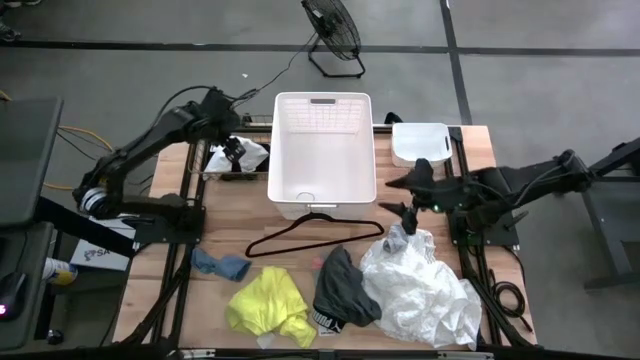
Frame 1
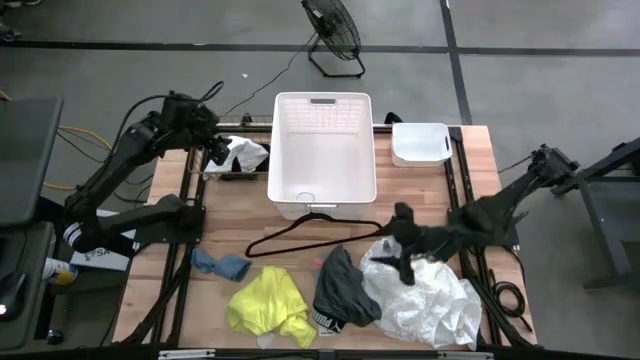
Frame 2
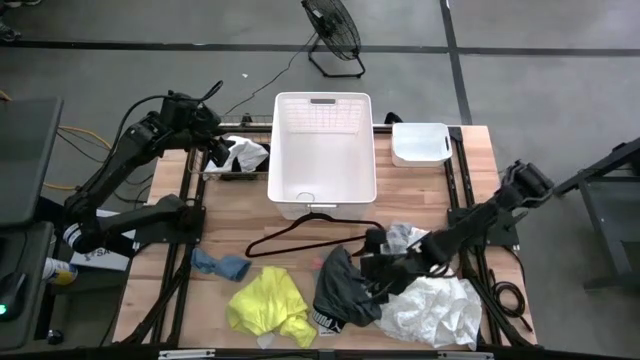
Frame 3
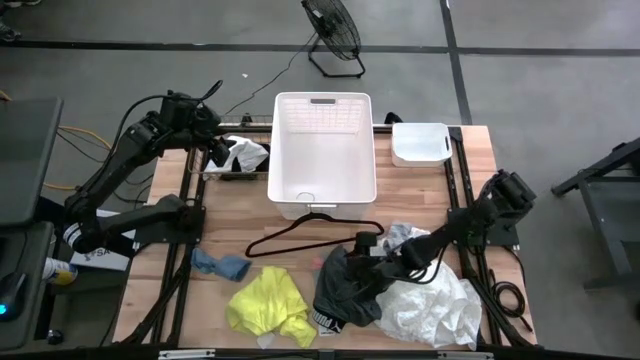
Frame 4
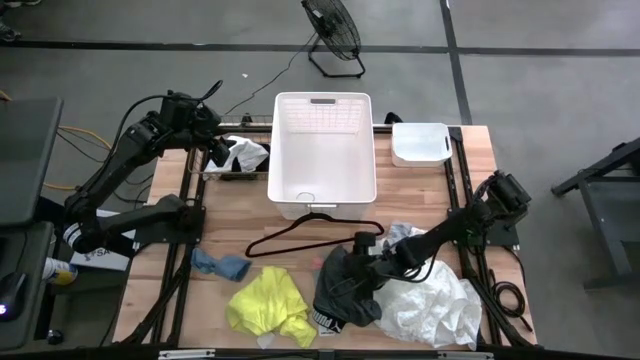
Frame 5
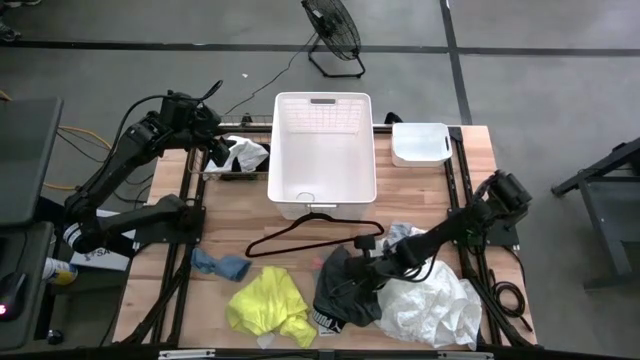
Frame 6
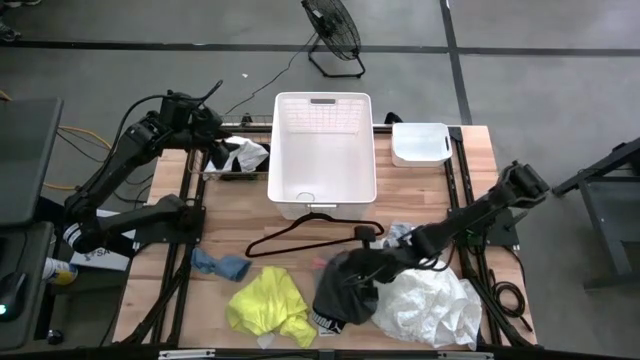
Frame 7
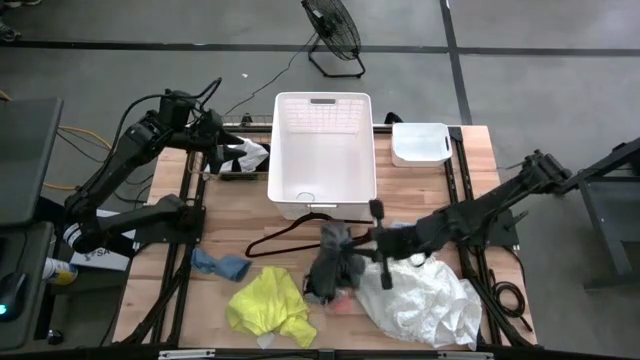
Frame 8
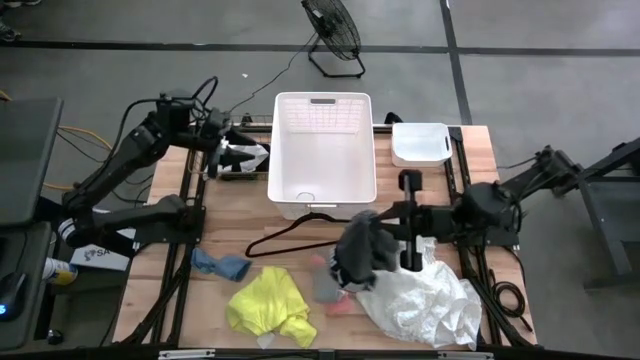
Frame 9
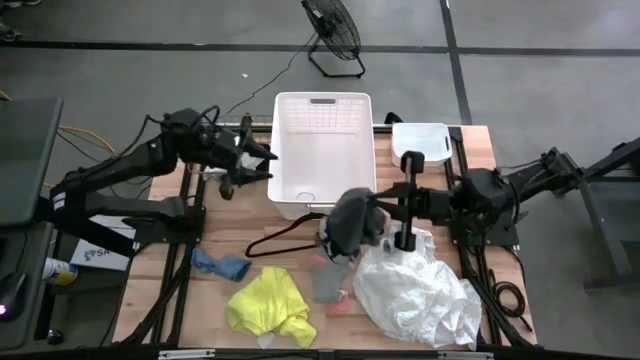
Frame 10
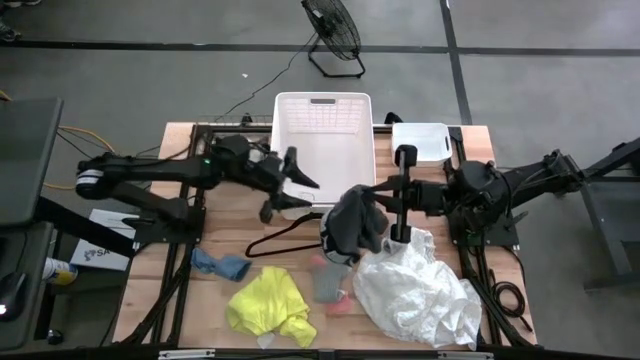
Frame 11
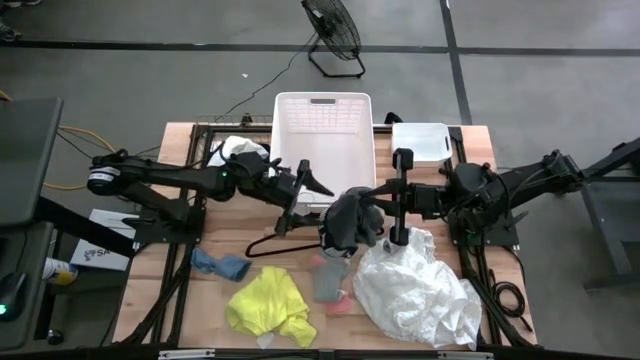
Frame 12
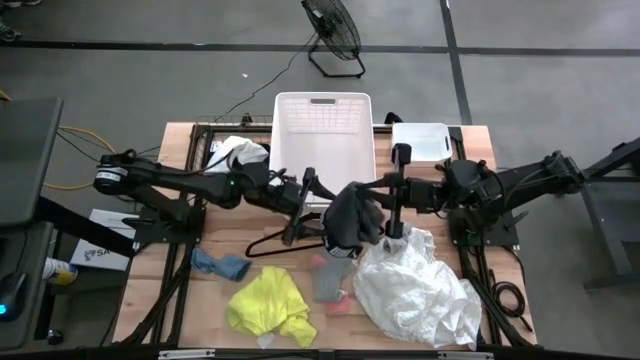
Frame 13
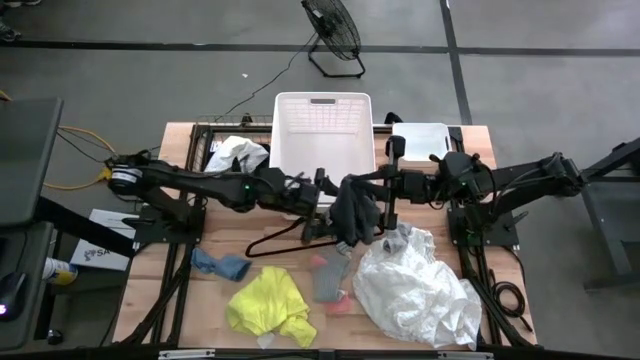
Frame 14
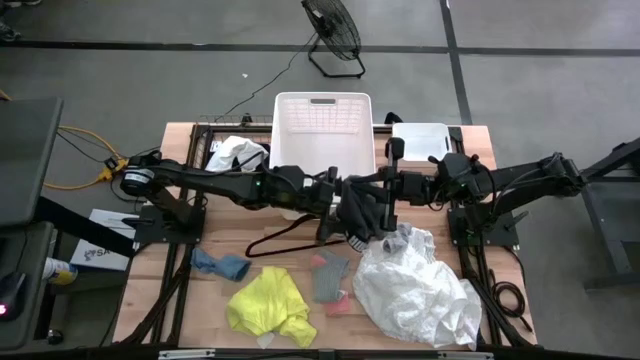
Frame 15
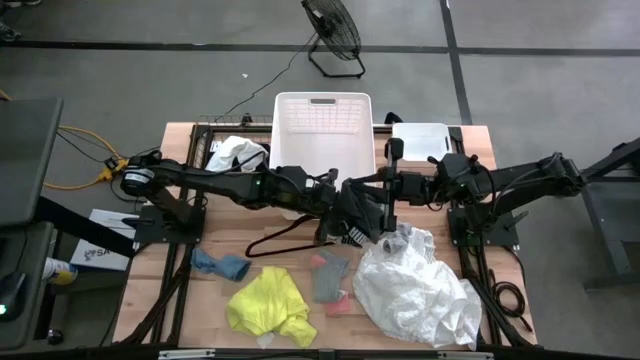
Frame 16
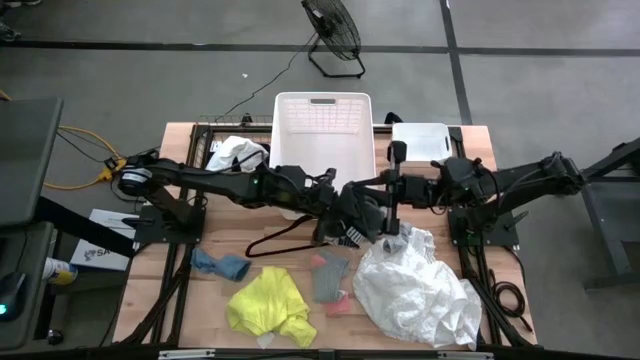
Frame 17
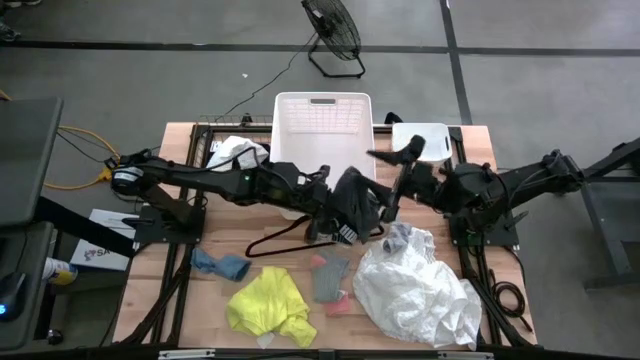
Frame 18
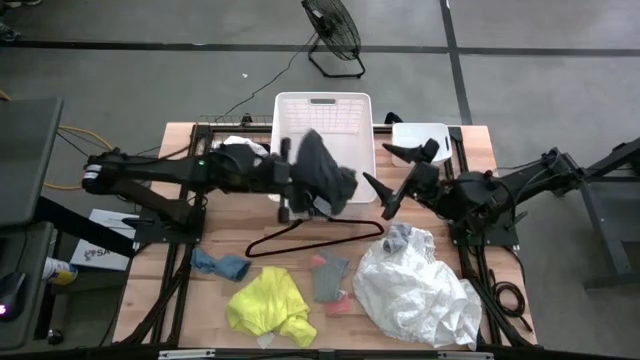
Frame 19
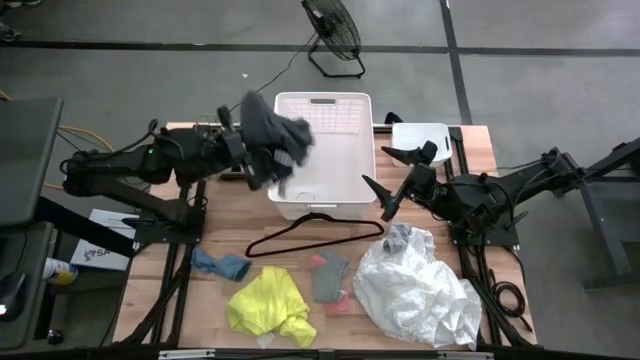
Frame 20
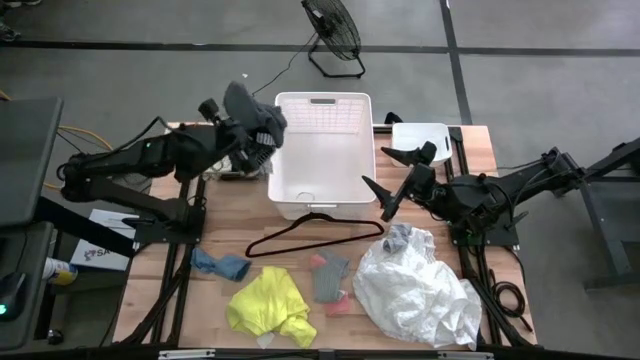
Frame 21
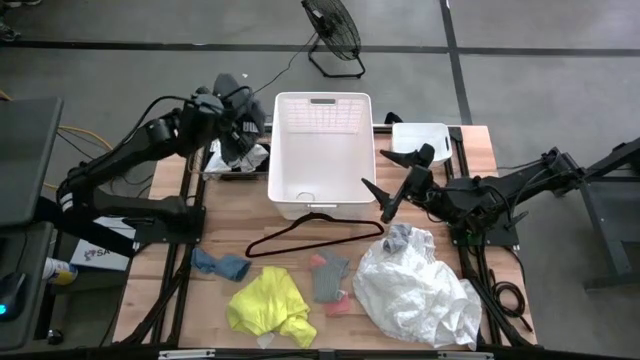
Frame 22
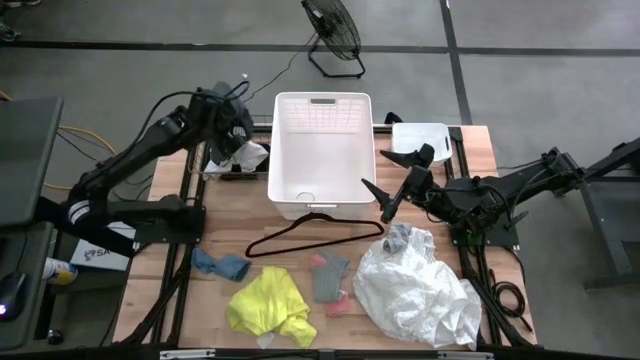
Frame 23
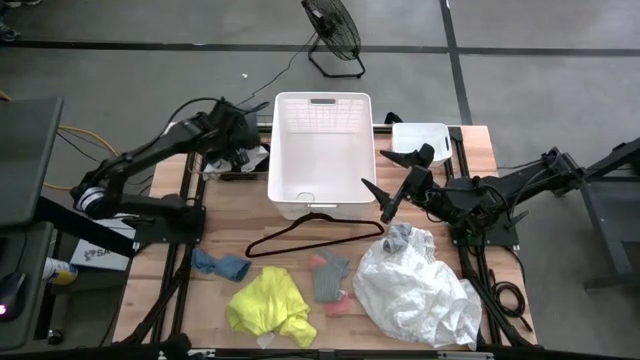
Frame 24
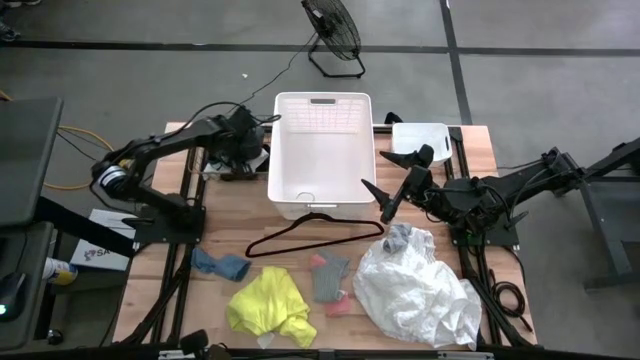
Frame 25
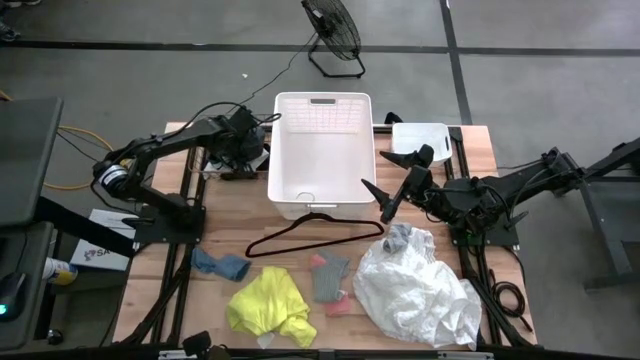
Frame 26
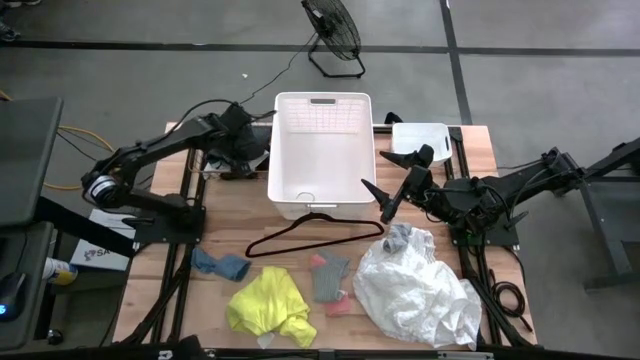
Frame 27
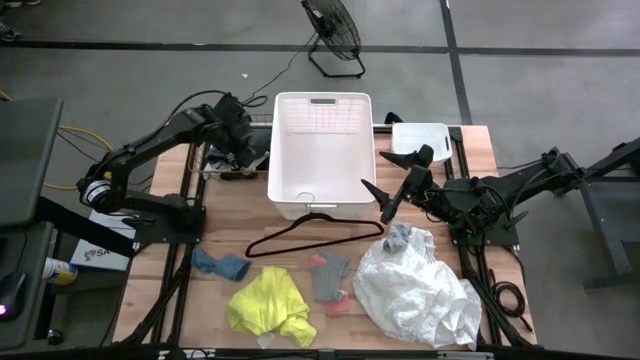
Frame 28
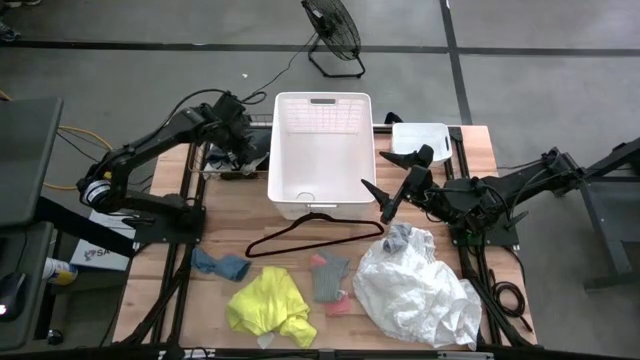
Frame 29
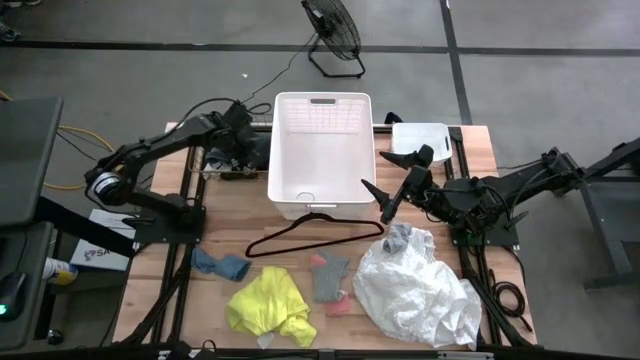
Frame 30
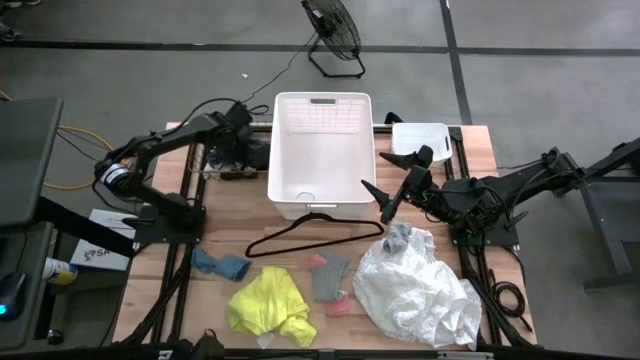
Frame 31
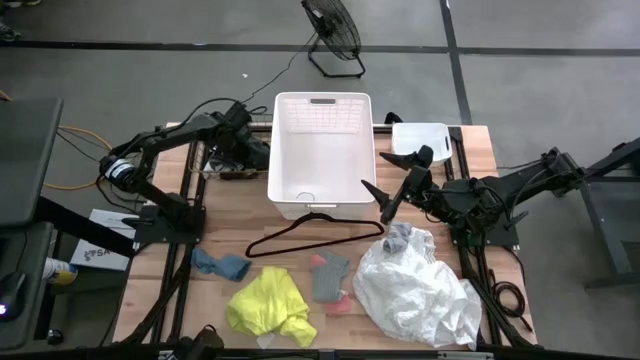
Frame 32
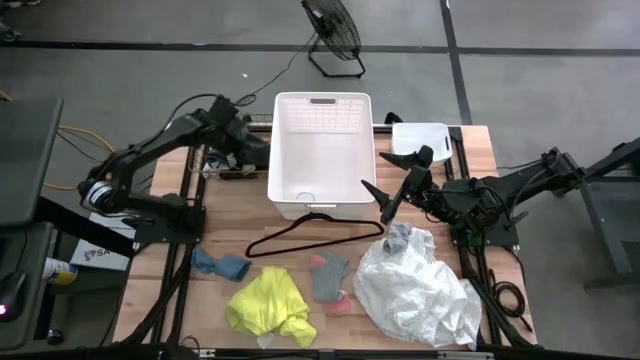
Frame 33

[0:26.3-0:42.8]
Task: Pick & Place Cloths
Put the gray underwear into the wire basket

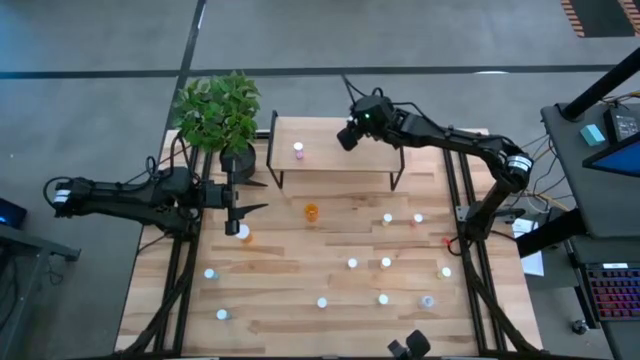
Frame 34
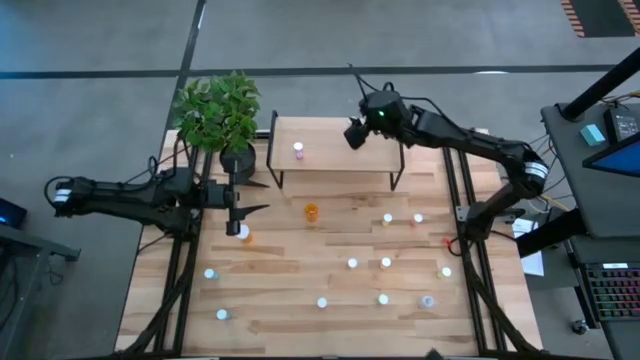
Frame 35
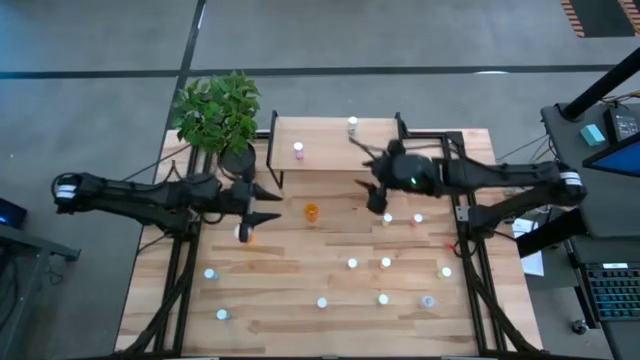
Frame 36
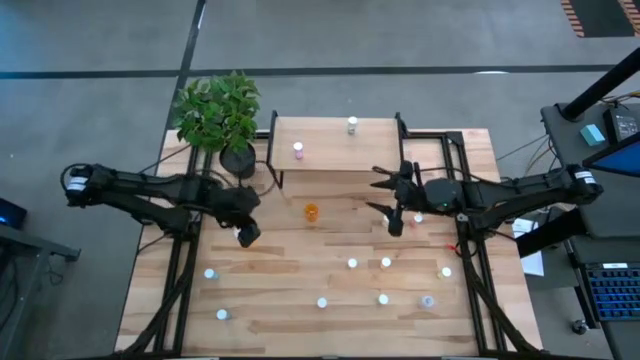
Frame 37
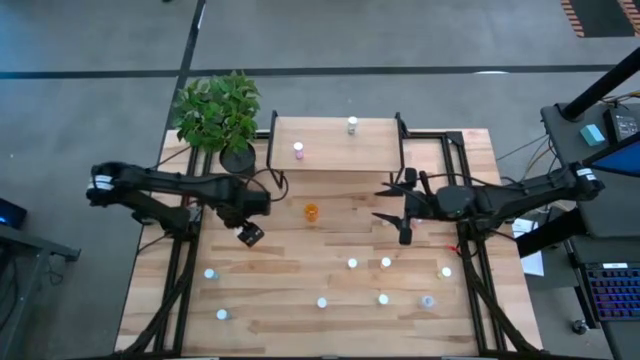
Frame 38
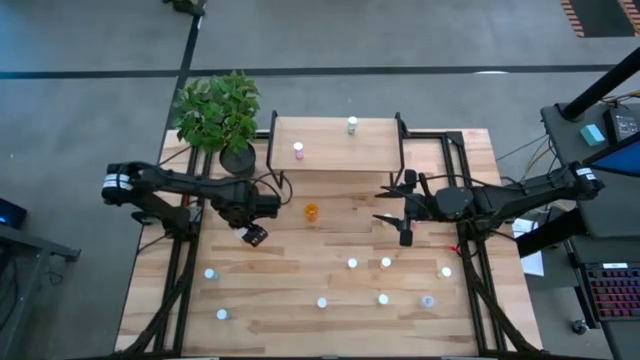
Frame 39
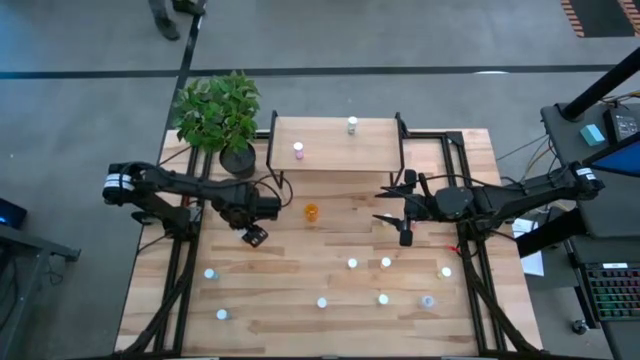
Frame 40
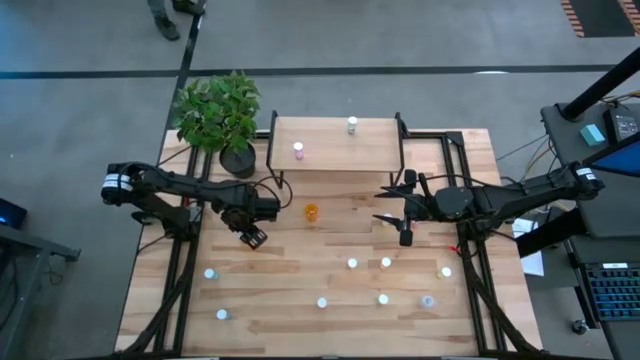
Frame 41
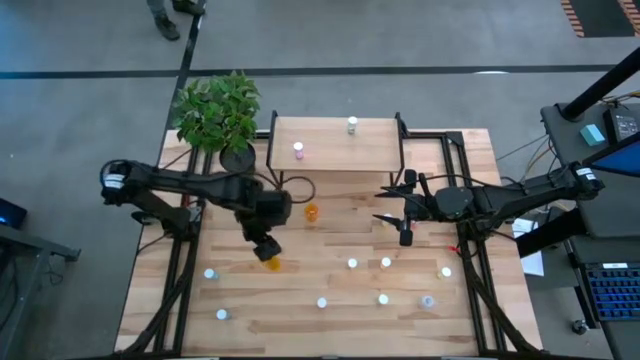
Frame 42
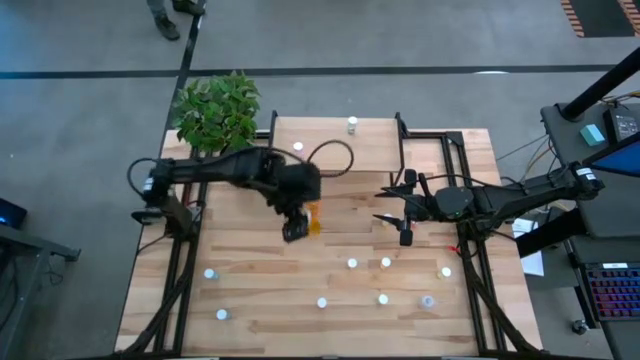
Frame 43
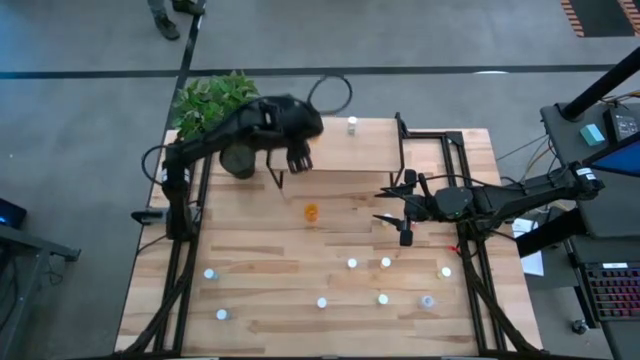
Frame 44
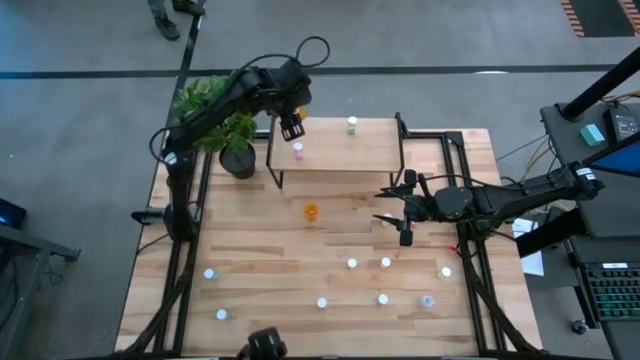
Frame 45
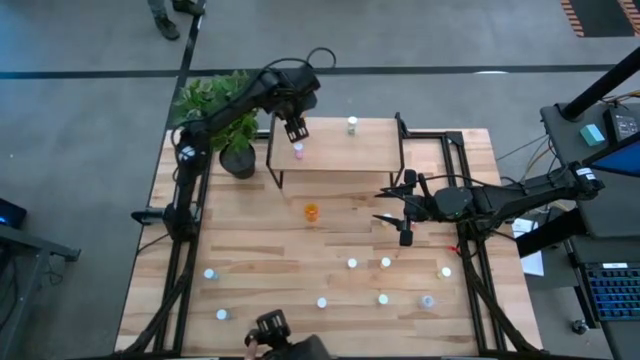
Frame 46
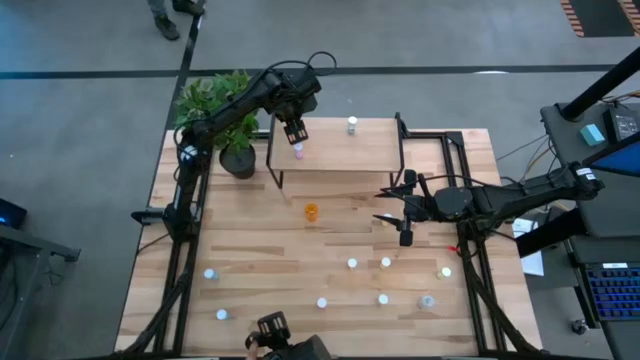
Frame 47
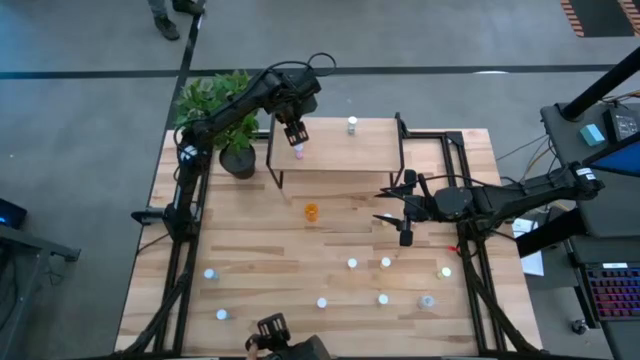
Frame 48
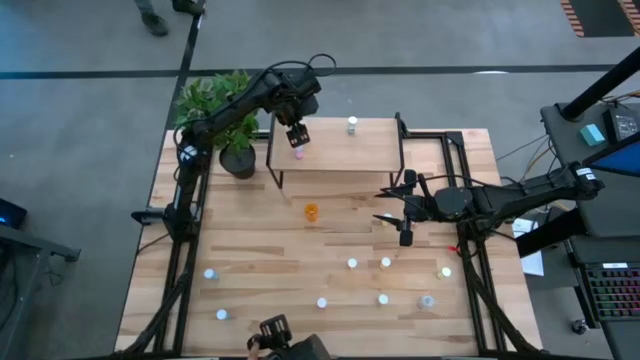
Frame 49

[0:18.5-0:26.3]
Task: Pick and place medicine bottles onto shelf by color
Put the orange pill bottle on the shelf
